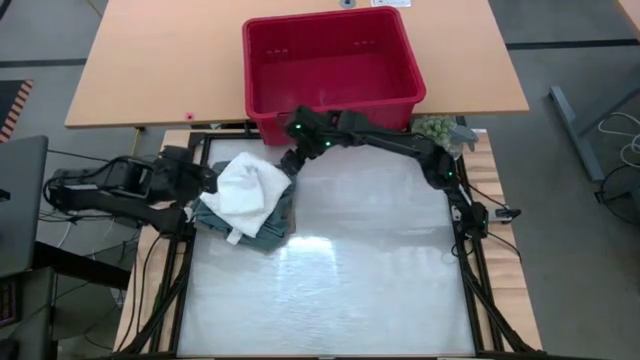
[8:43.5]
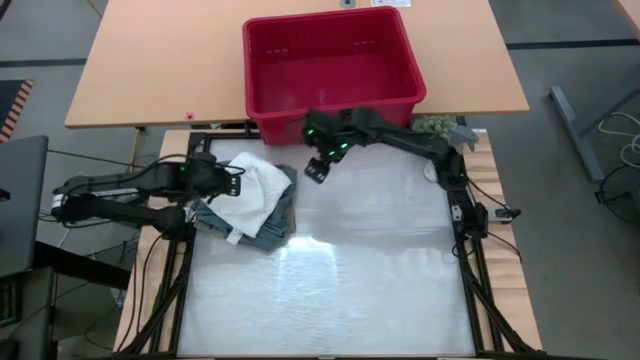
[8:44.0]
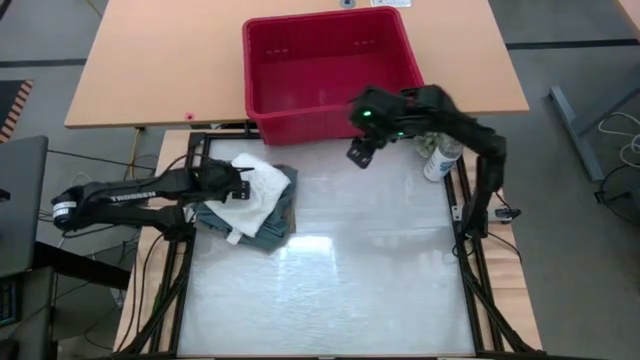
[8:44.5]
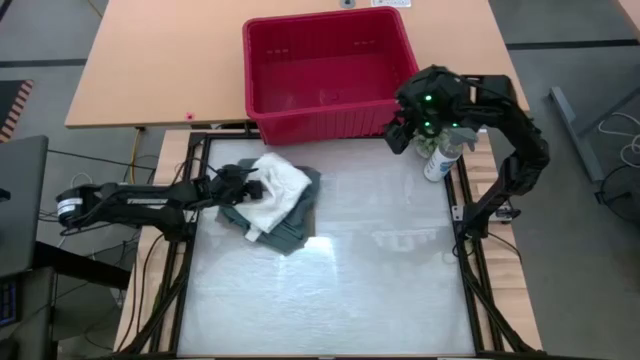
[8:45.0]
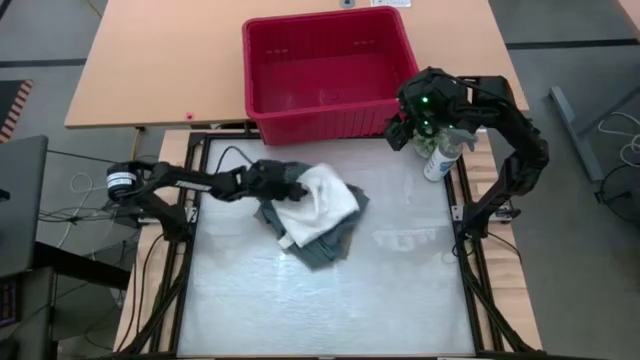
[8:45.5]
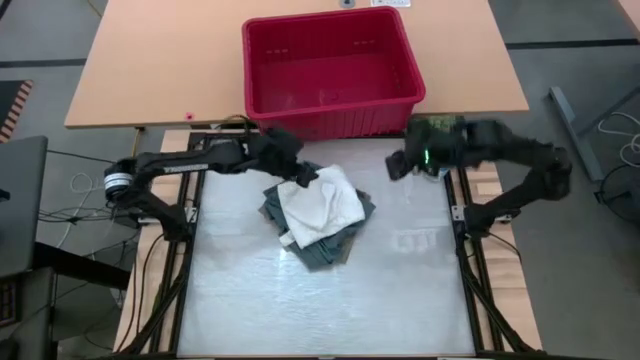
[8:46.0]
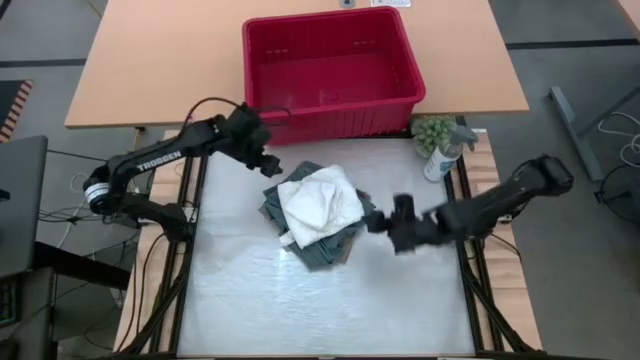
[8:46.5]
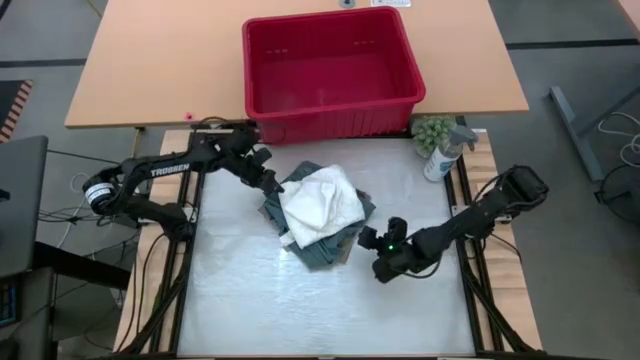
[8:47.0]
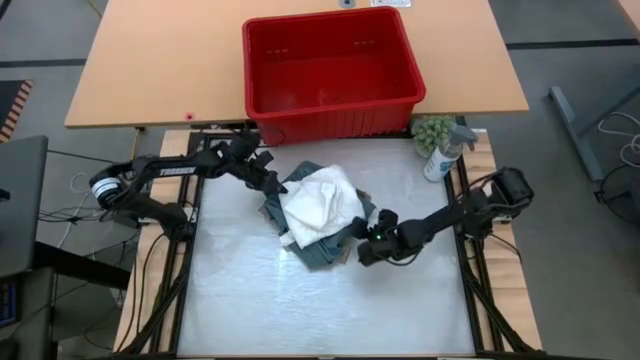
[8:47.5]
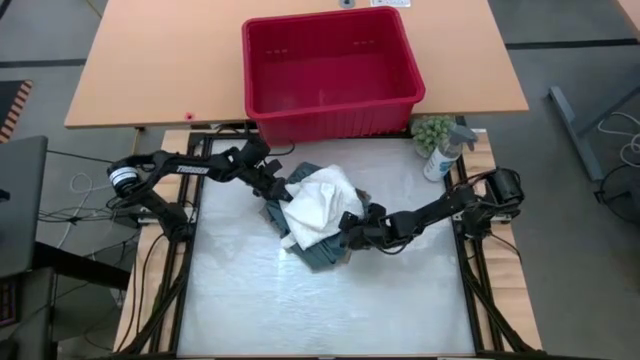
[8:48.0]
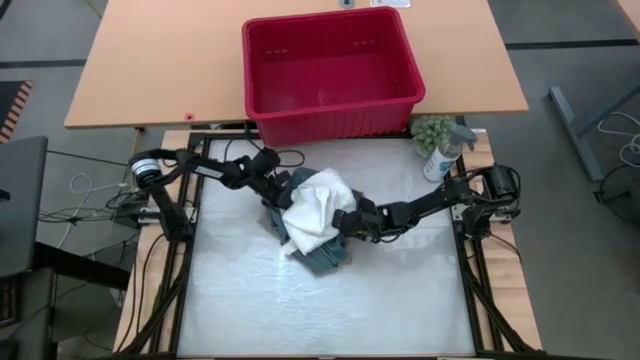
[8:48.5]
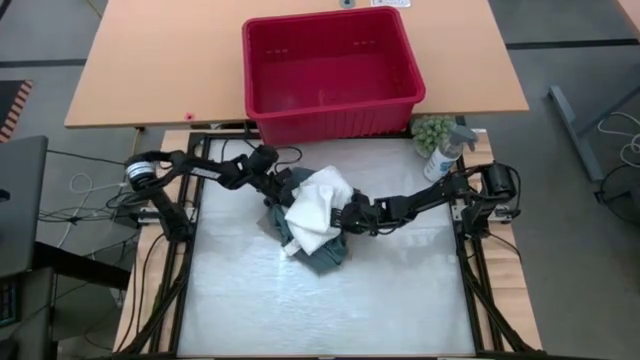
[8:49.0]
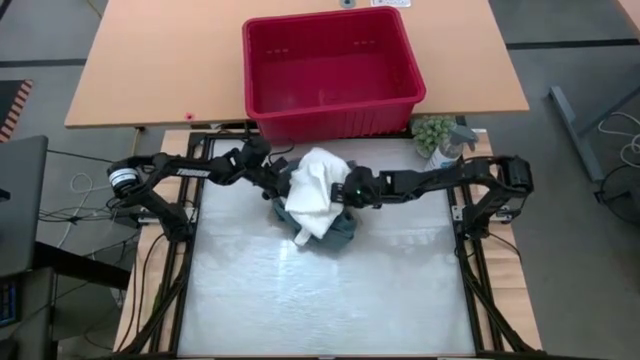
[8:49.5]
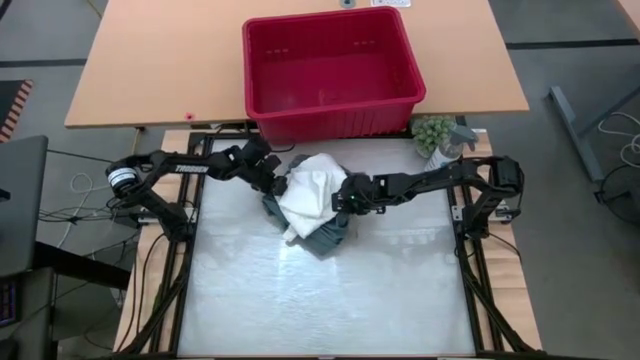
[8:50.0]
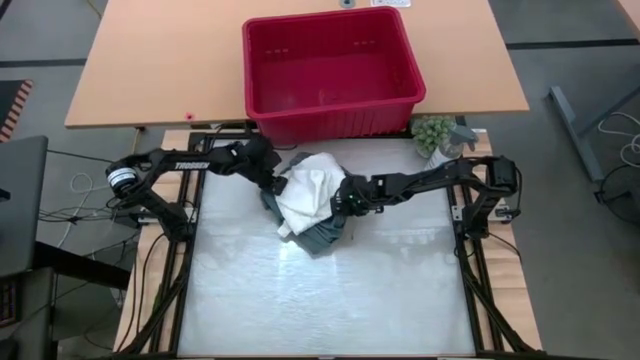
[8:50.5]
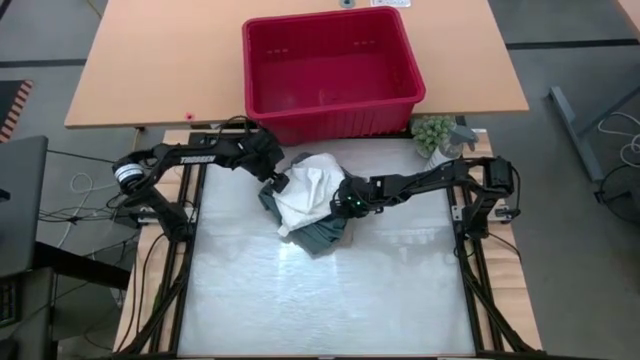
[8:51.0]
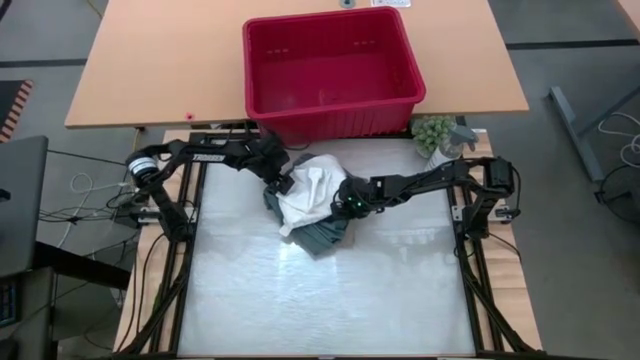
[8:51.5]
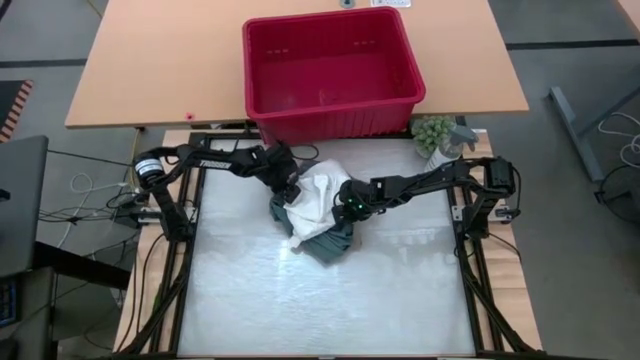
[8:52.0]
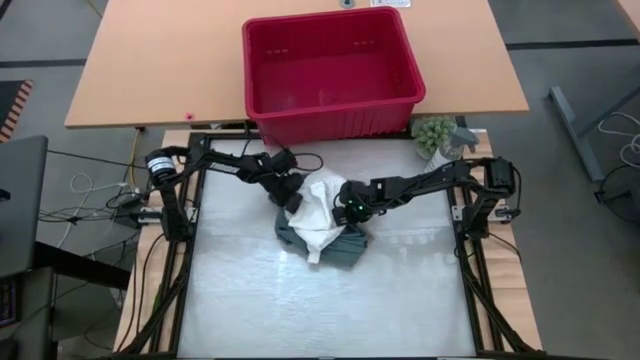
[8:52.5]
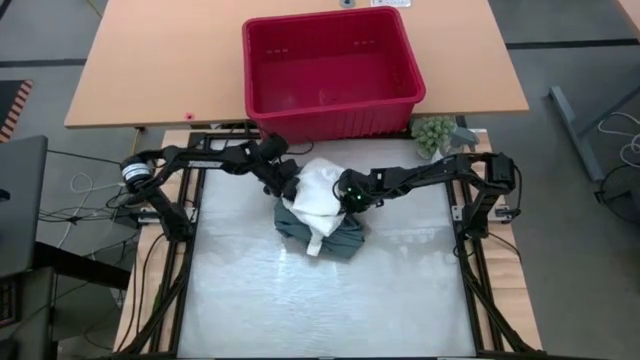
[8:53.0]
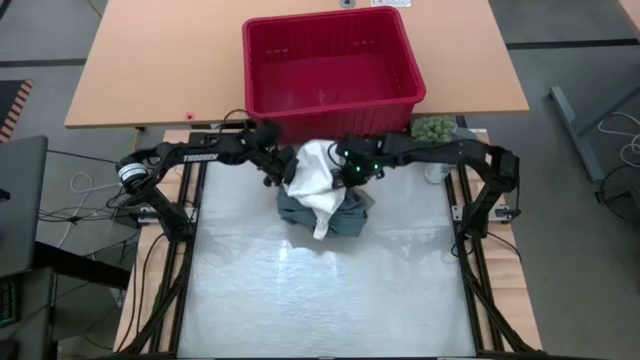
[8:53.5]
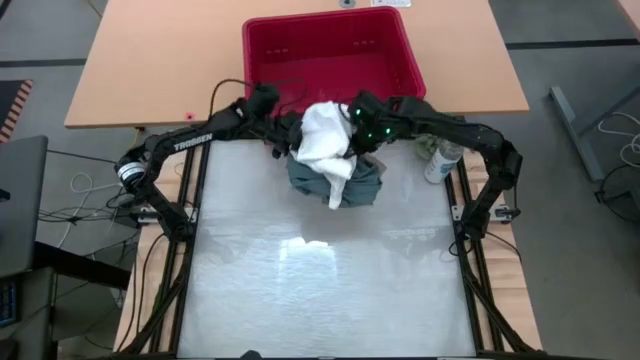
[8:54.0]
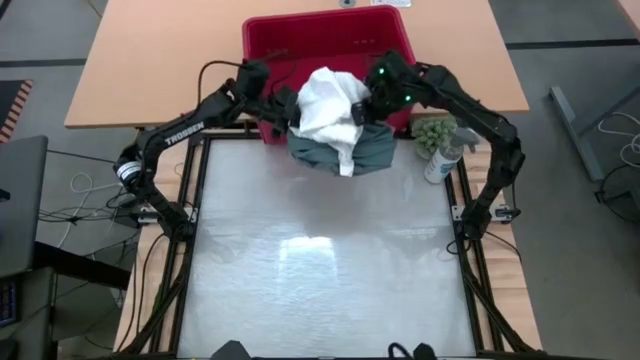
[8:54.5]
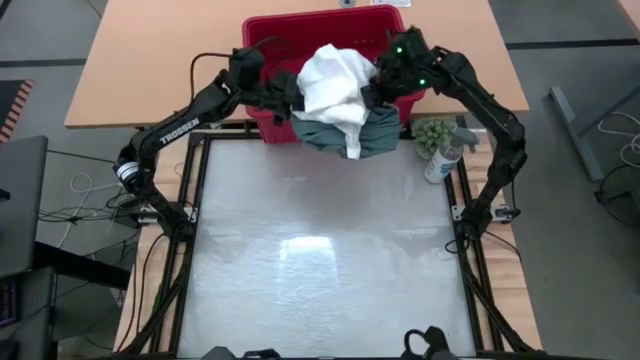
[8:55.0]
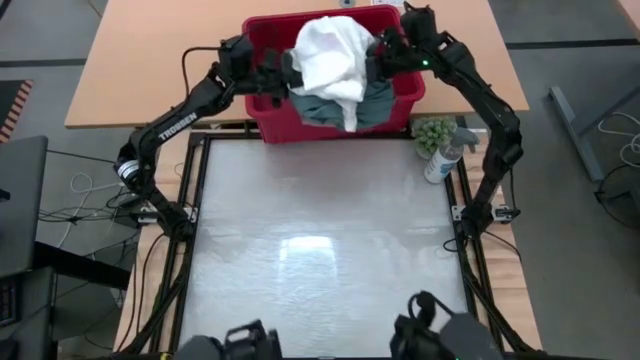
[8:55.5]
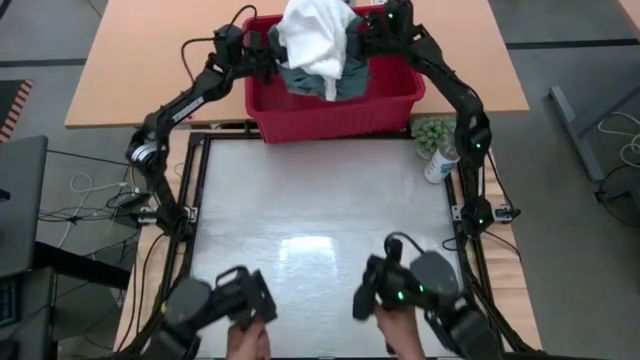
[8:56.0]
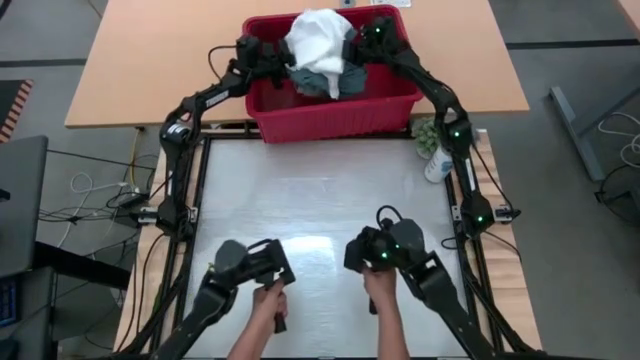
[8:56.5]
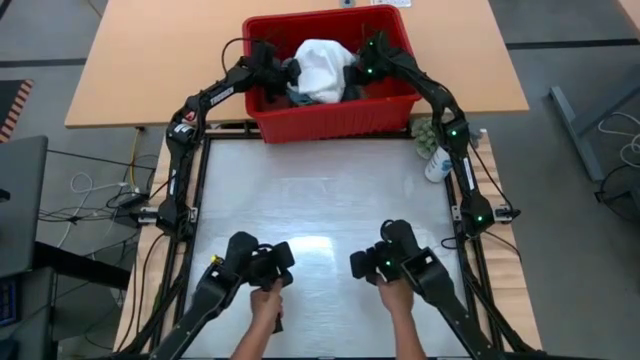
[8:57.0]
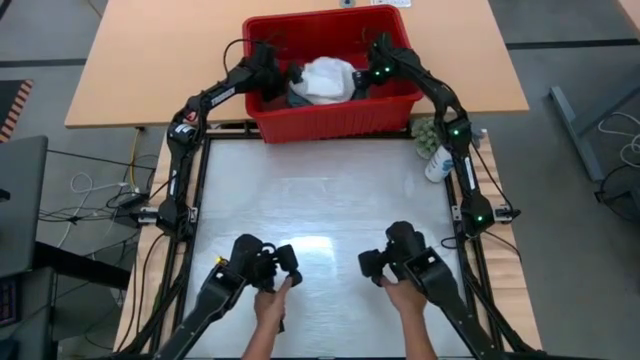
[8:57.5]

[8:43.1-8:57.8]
Task: Fold Laundry from Bin
Put the stacked folded clothes in the red bin

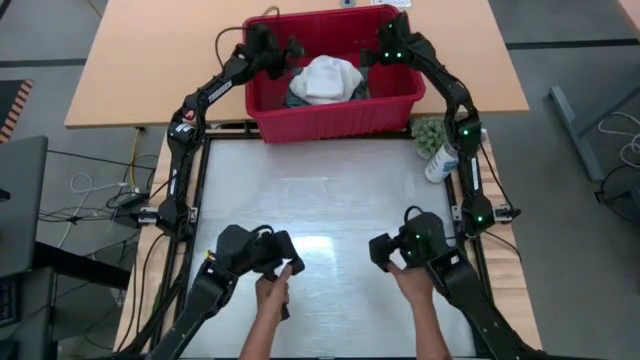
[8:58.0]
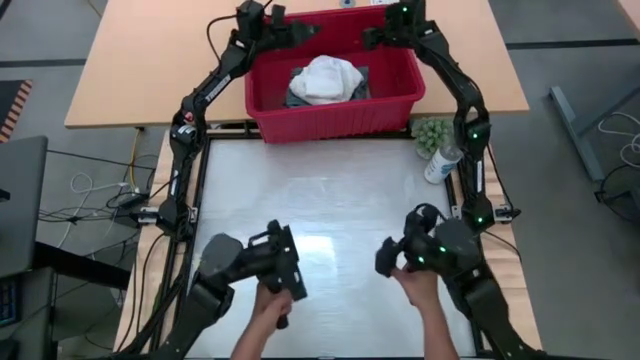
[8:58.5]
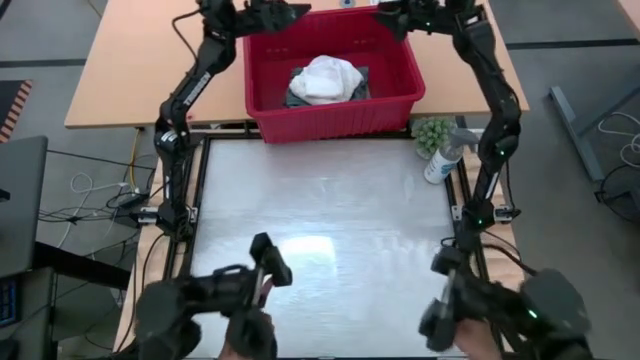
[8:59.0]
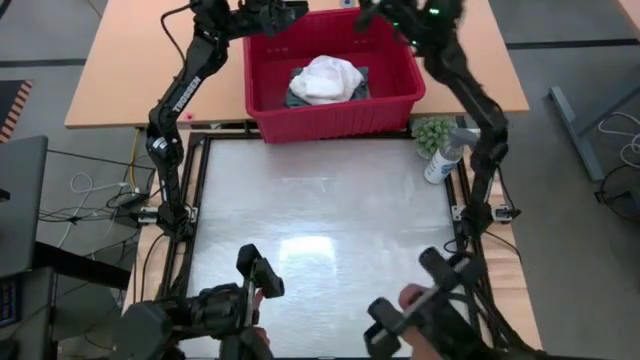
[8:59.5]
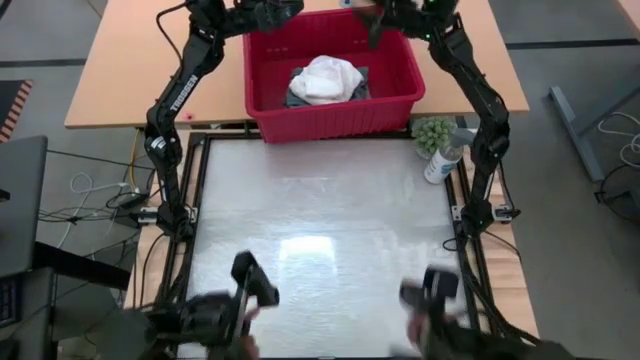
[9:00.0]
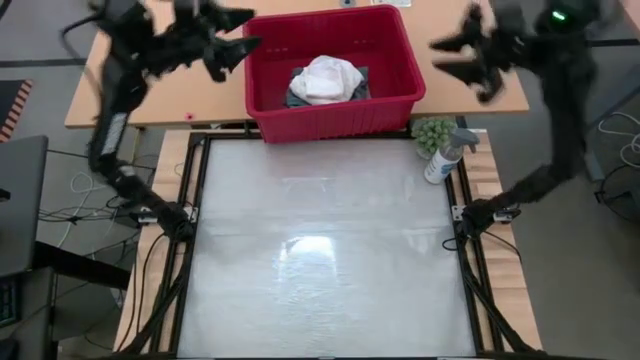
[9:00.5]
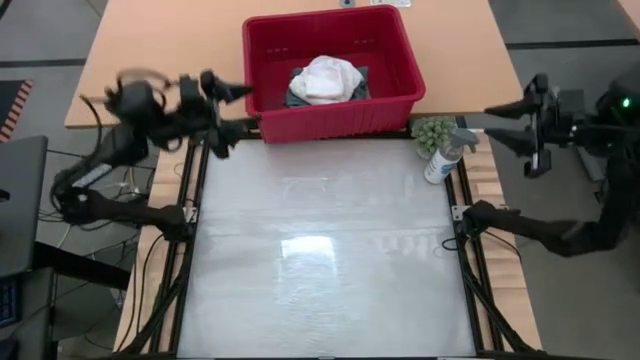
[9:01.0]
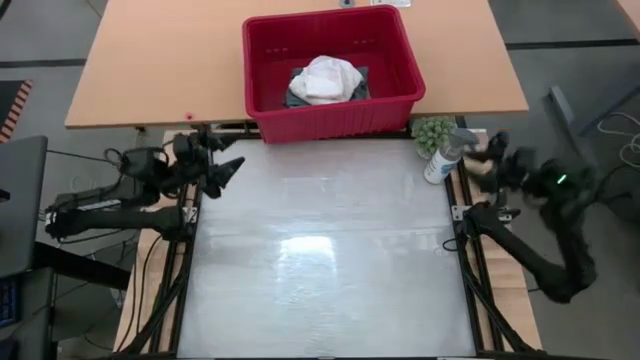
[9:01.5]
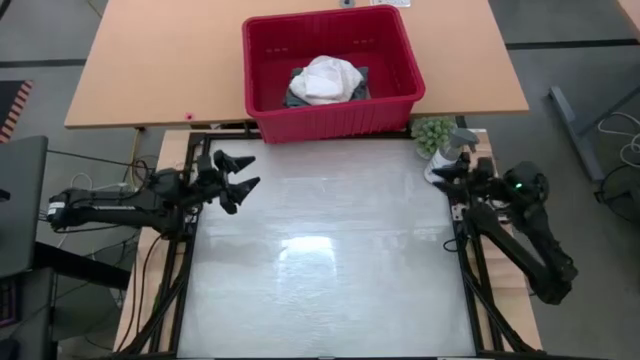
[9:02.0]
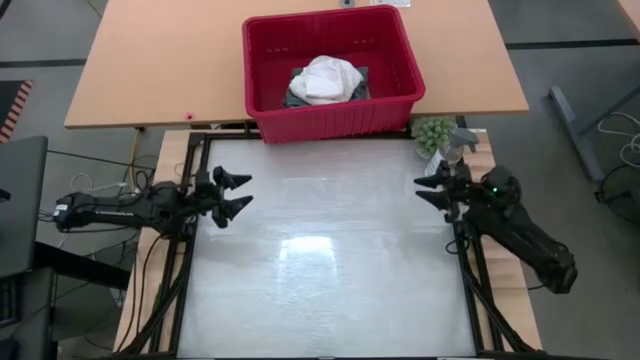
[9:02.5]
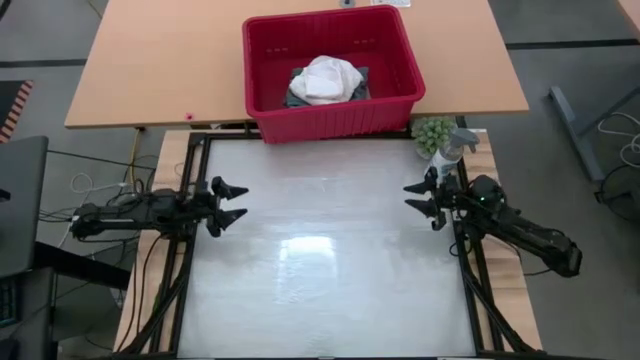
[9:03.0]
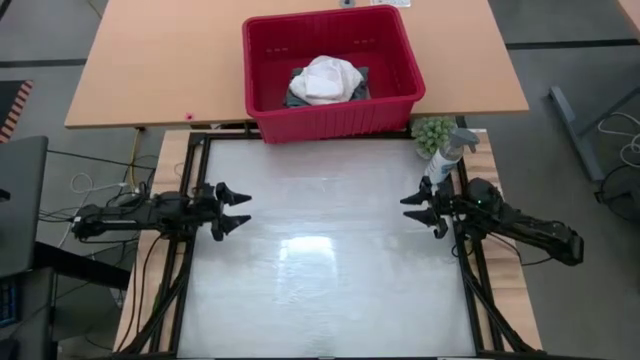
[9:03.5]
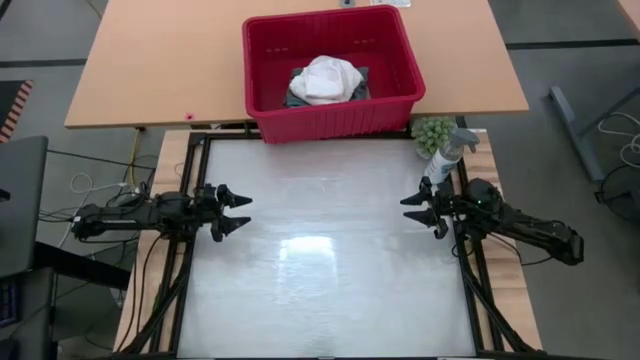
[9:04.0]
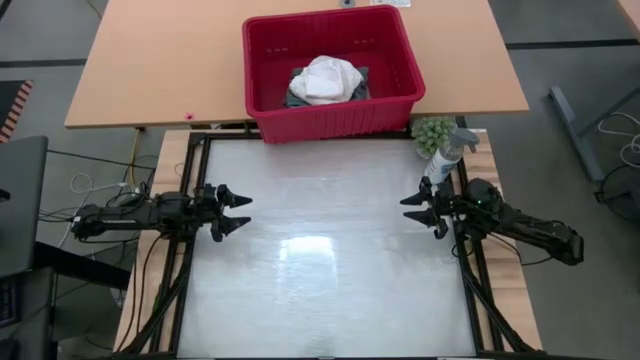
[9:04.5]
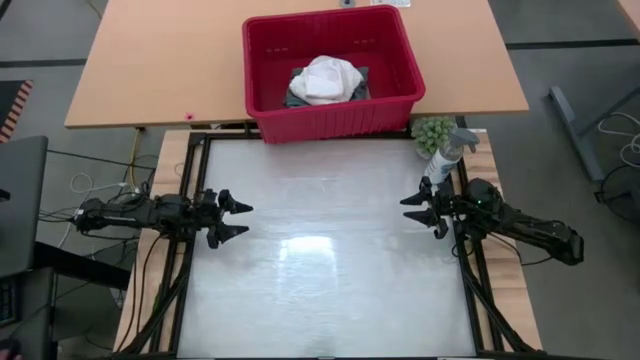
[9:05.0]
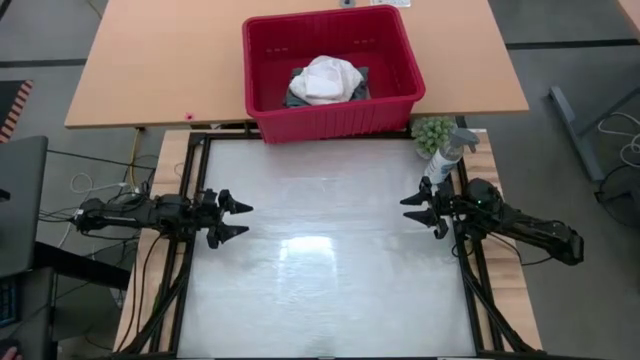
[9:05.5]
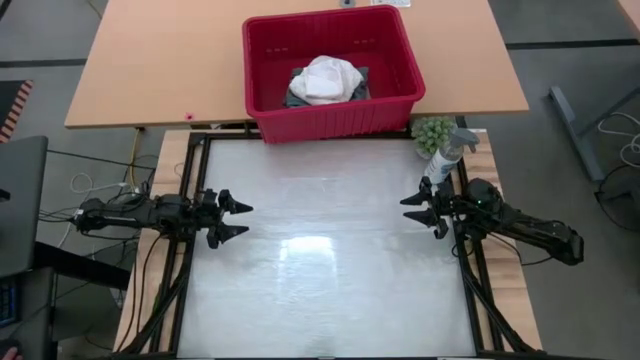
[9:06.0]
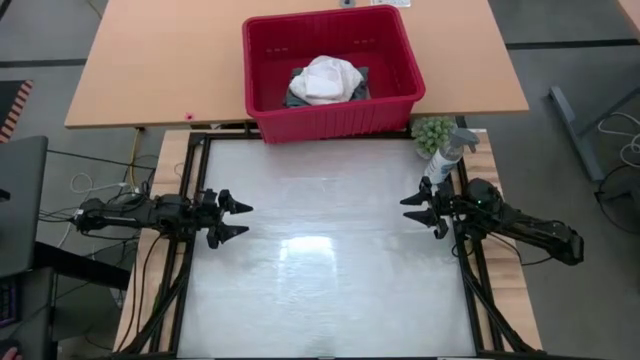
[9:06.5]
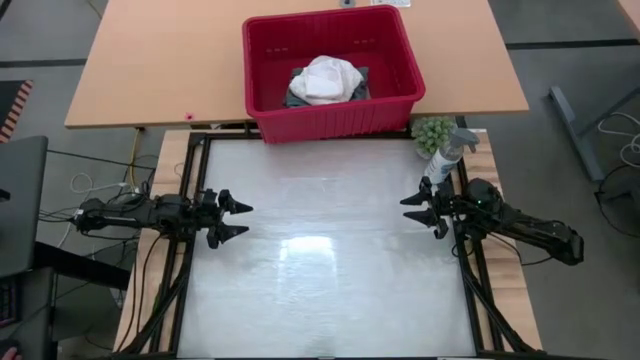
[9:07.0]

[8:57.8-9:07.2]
Return to Home Position
